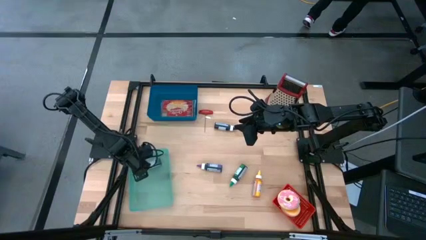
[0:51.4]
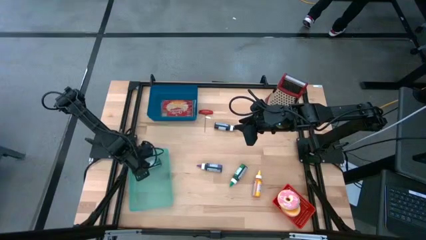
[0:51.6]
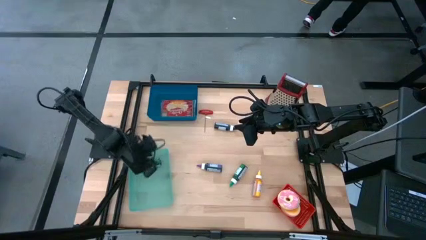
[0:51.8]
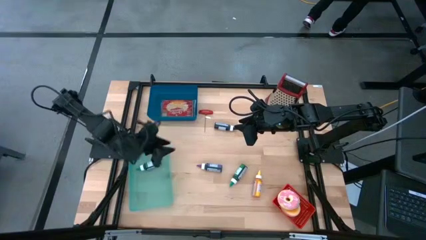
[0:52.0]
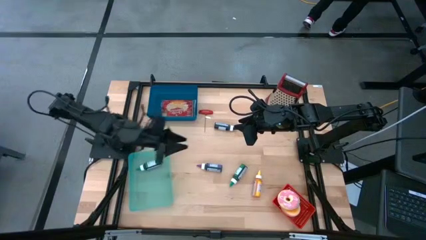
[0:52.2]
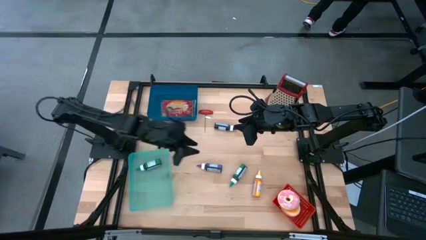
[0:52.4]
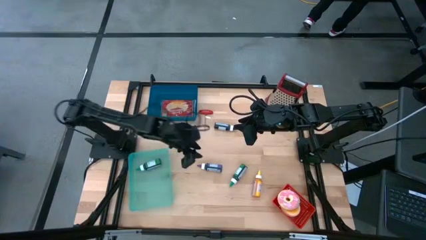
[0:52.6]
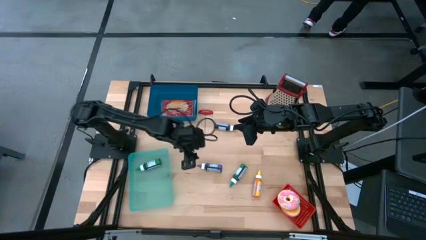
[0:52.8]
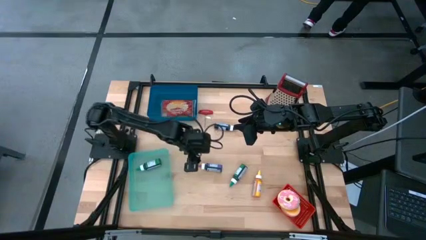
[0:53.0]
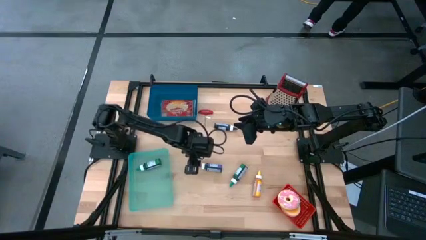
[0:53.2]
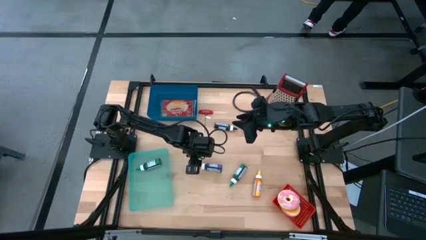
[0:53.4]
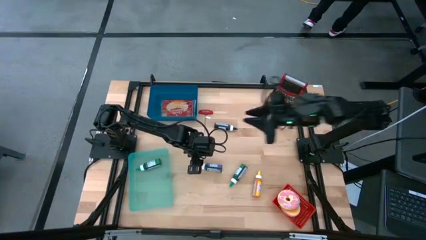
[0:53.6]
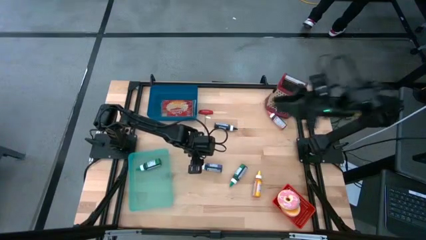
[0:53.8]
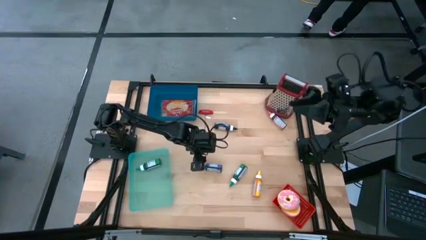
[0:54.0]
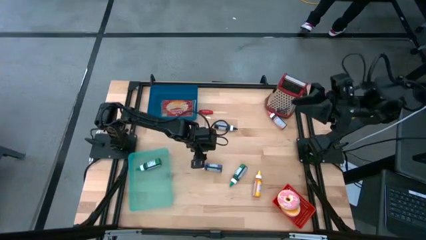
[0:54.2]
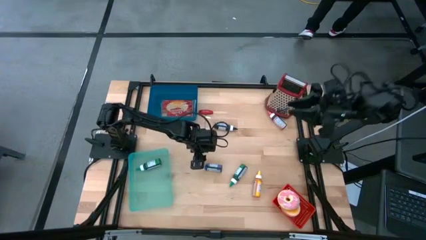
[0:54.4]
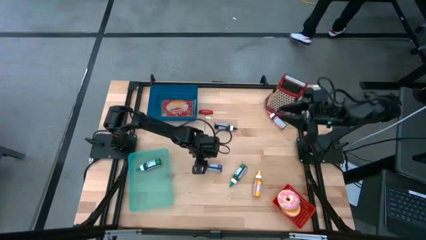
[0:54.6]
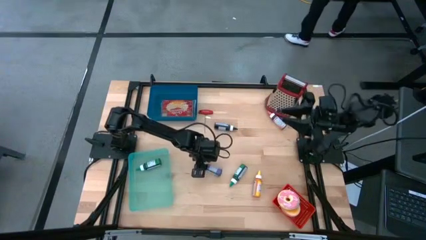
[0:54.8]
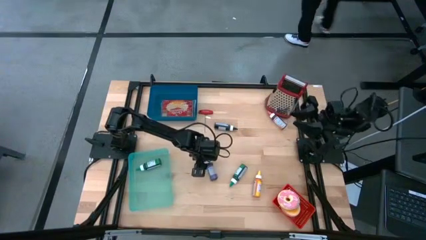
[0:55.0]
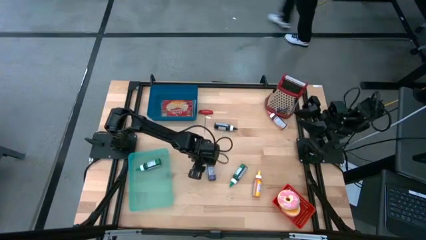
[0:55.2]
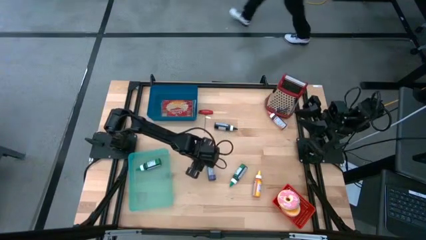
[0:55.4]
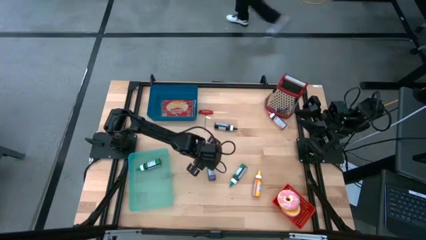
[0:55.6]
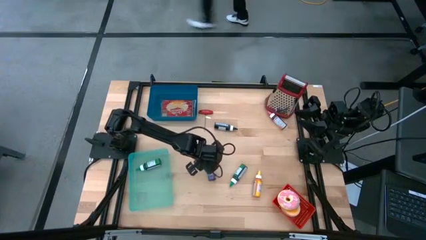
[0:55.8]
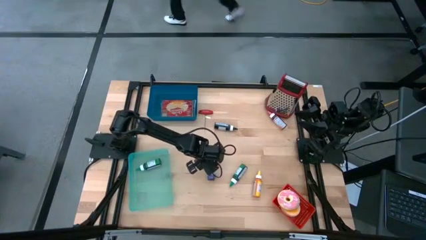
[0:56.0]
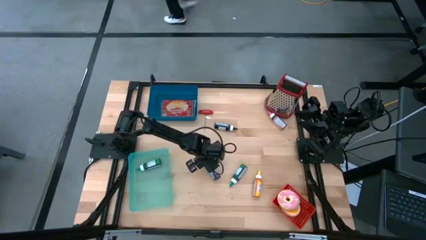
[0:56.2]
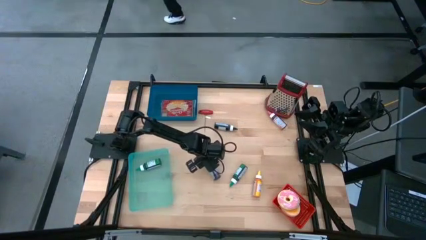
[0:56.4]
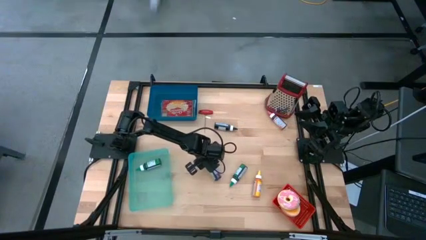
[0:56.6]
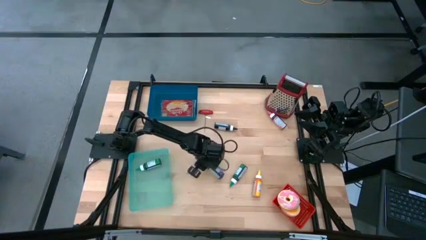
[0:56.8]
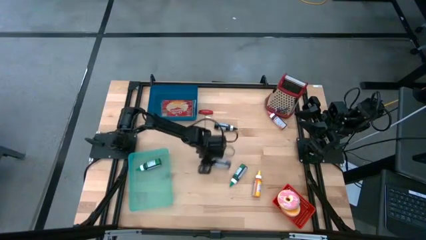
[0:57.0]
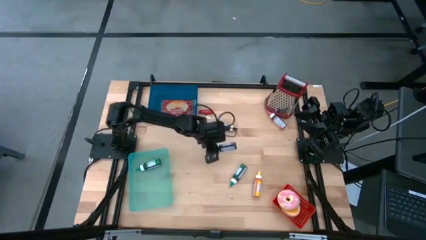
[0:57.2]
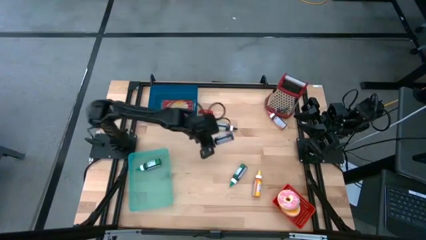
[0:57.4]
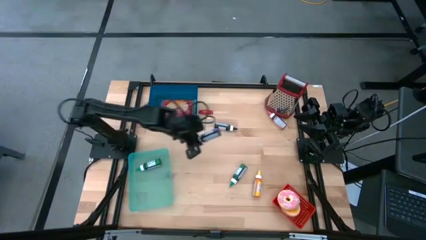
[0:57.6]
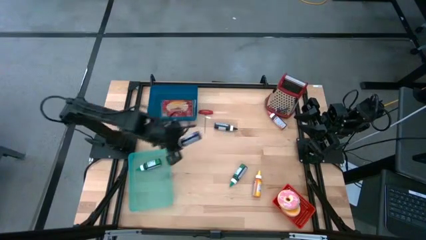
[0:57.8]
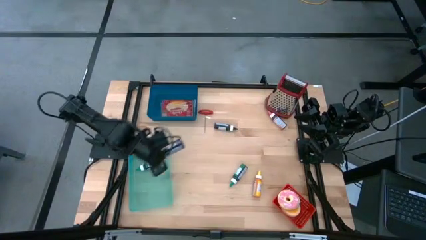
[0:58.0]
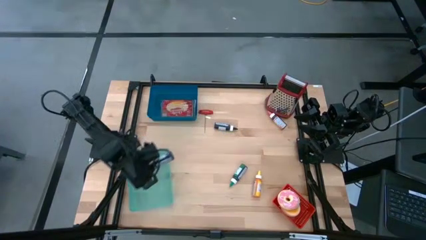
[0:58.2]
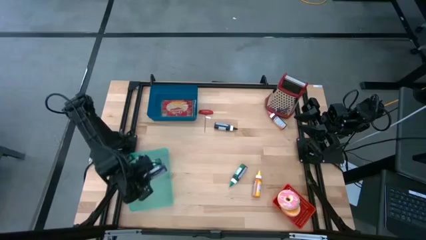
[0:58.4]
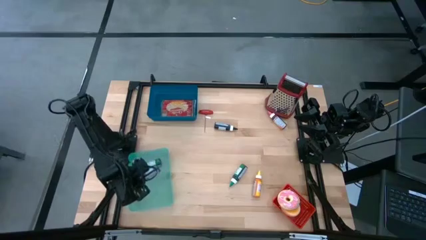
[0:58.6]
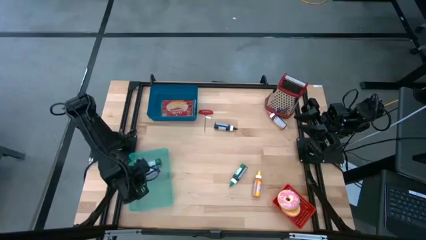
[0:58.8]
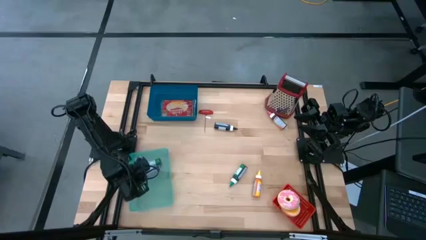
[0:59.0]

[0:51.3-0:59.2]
Put the violet food coloring bottle into the green bin

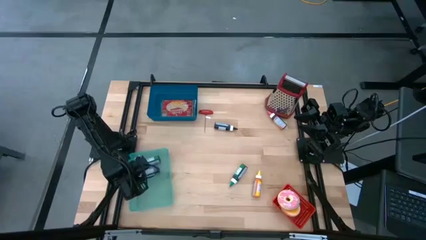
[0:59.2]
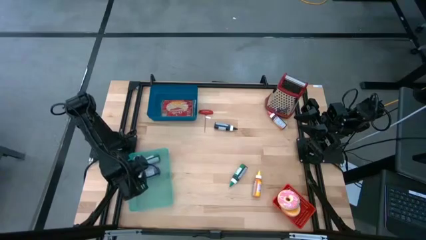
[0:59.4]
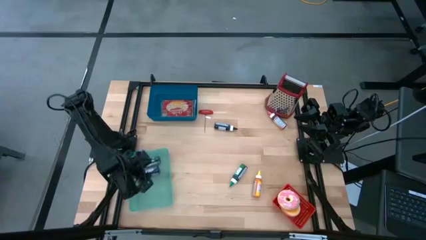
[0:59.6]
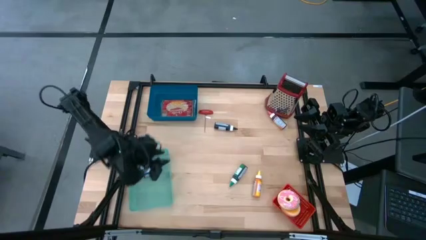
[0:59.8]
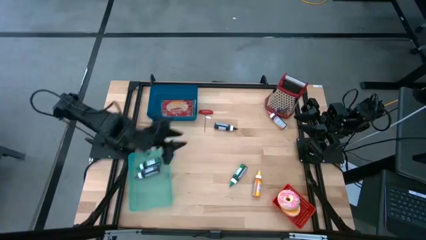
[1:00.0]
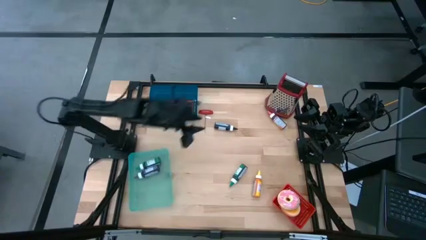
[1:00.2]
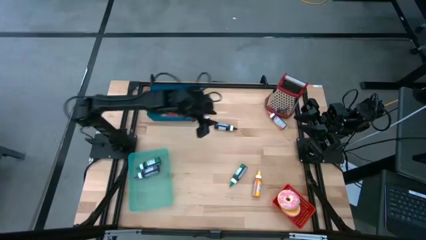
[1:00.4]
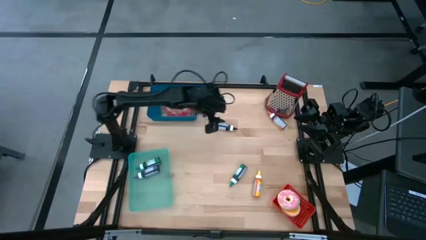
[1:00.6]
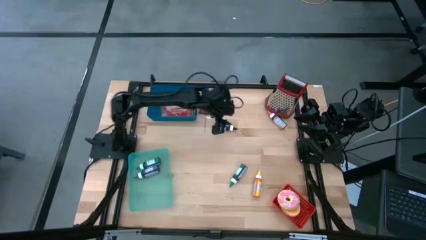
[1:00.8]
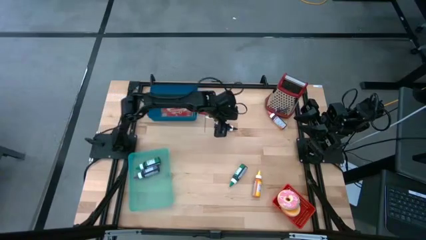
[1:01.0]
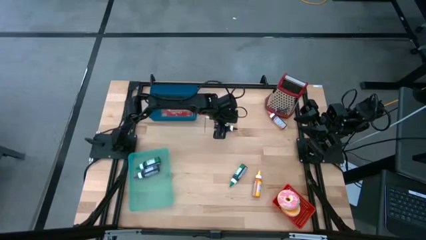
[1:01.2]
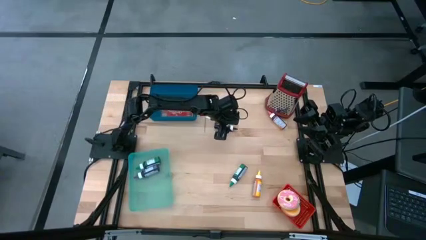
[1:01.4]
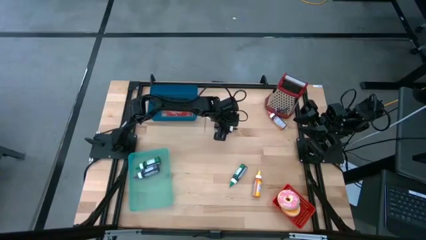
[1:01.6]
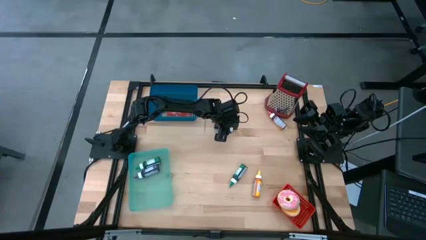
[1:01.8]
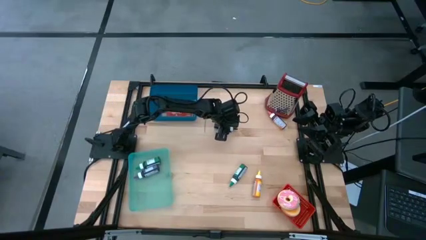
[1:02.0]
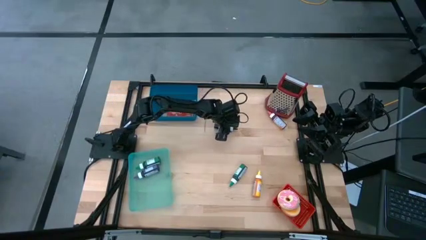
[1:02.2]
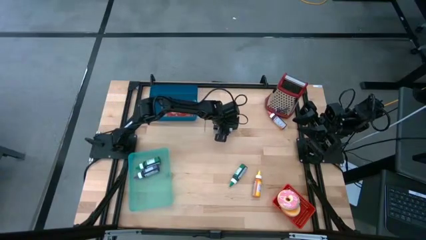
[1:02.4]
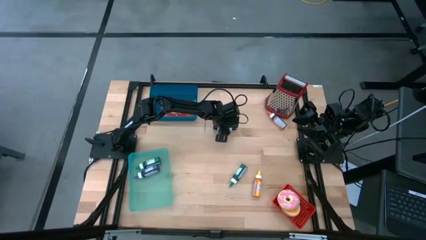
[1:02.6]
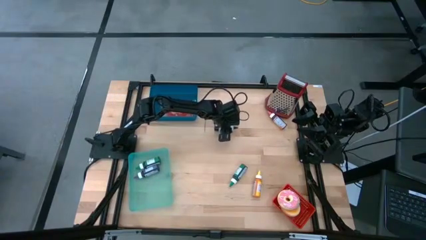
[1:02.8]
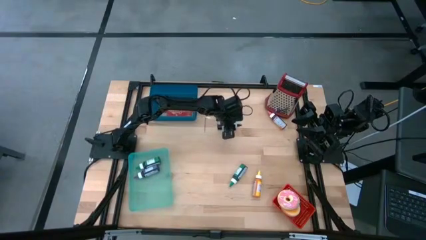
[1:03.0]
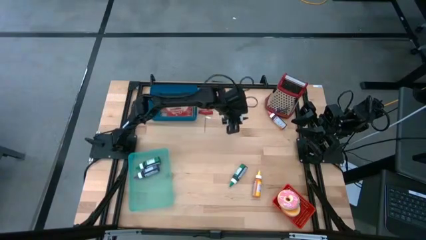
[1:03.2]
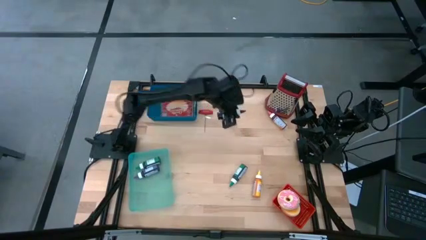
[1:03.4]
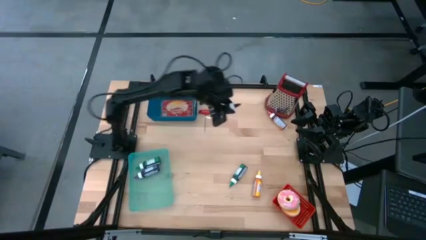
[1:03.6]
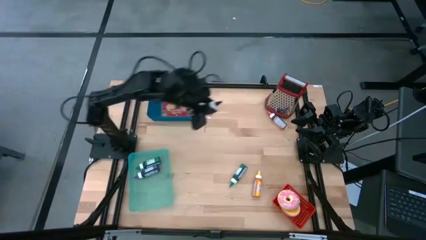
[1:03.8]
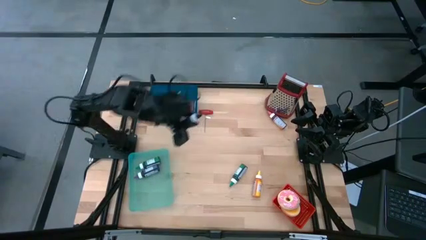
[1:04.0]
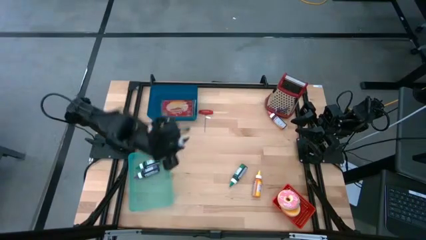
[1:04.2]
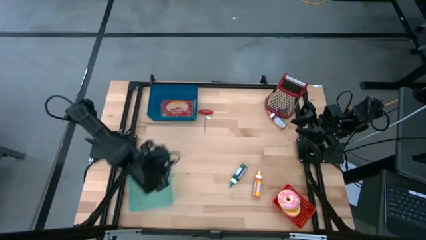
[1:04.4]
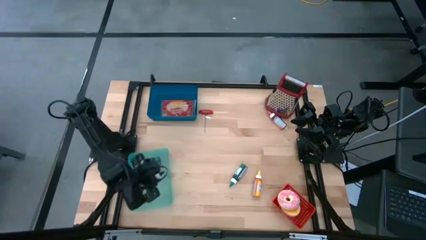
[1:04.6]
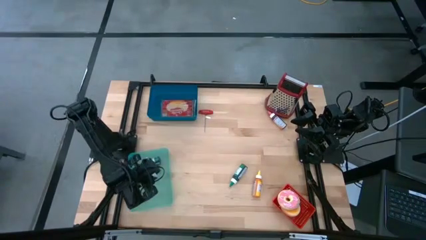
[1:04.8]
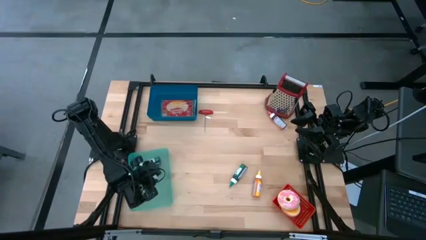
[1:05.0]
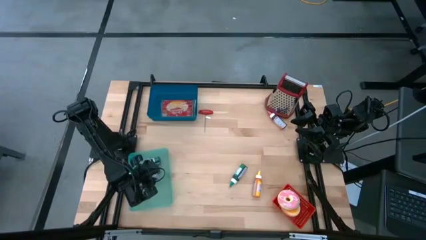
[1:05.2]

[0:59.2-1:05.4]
Put the black food coloring bottle into the green bin
